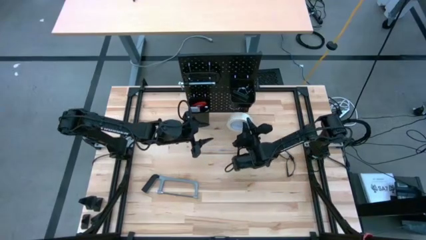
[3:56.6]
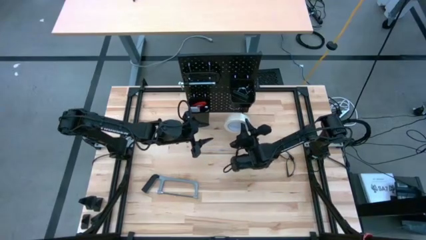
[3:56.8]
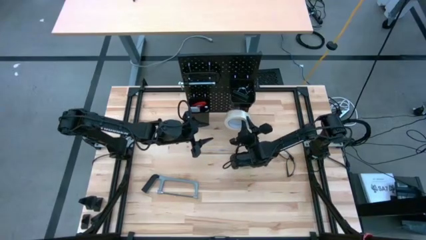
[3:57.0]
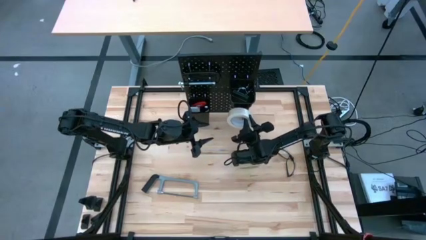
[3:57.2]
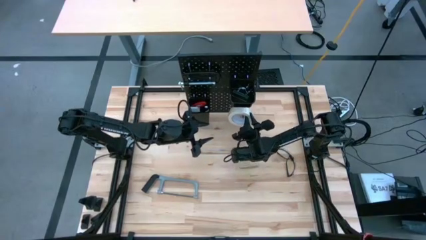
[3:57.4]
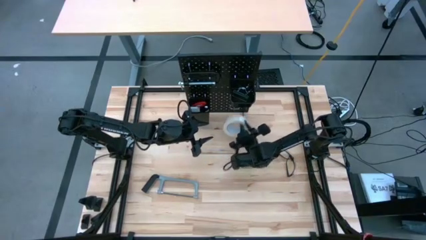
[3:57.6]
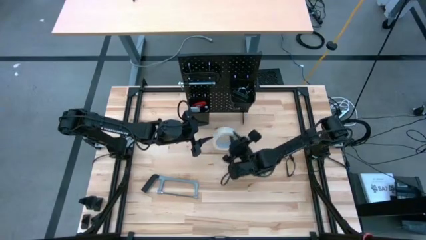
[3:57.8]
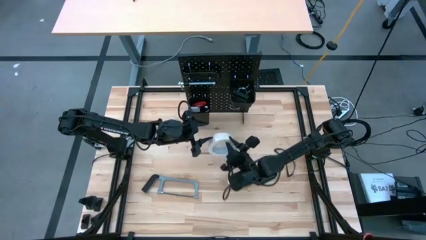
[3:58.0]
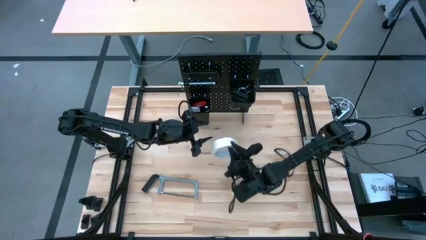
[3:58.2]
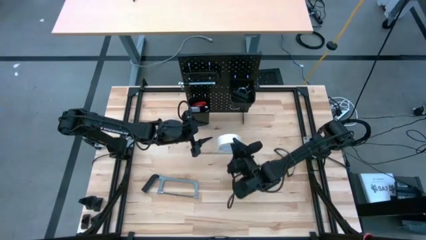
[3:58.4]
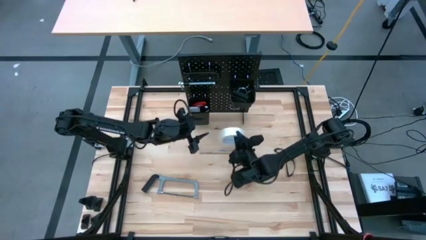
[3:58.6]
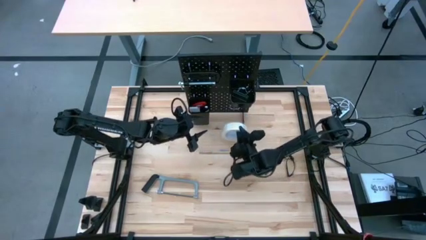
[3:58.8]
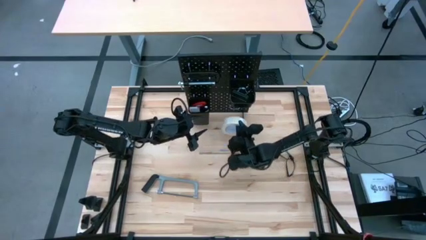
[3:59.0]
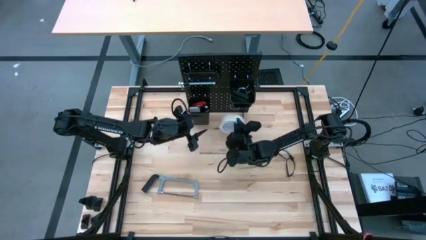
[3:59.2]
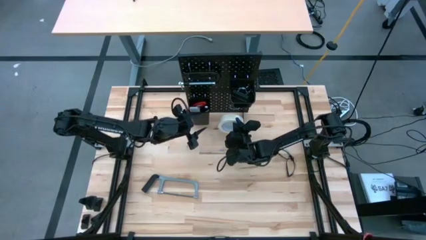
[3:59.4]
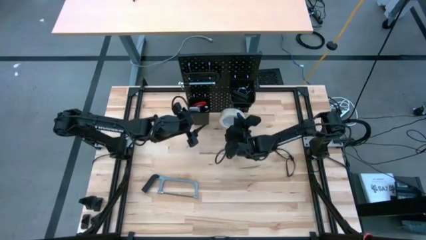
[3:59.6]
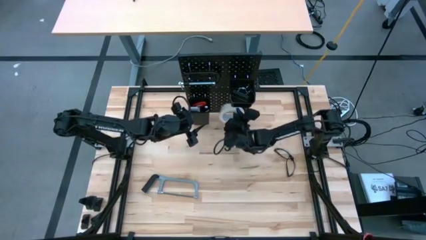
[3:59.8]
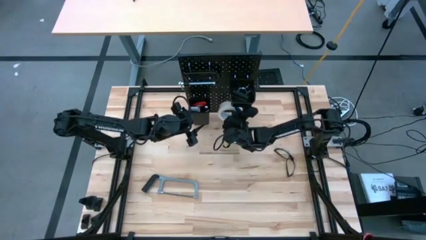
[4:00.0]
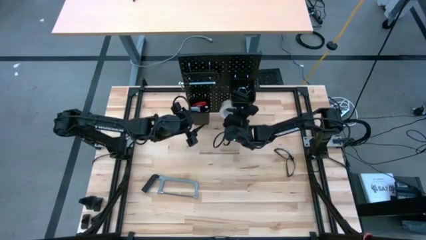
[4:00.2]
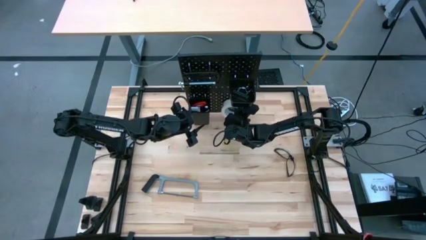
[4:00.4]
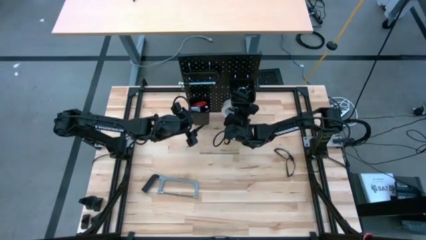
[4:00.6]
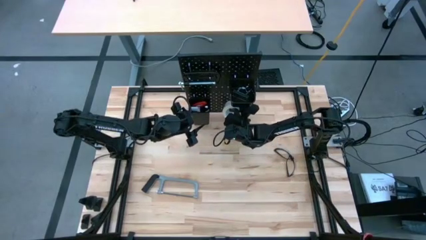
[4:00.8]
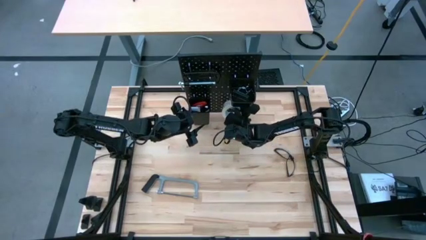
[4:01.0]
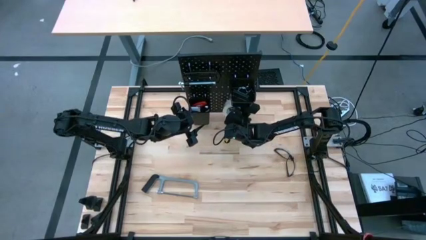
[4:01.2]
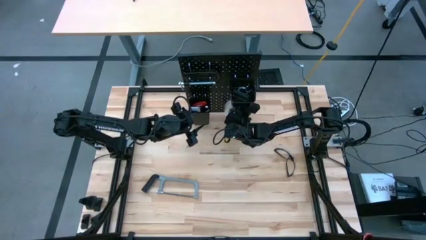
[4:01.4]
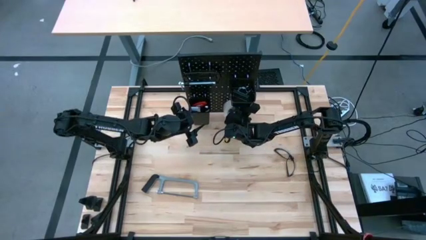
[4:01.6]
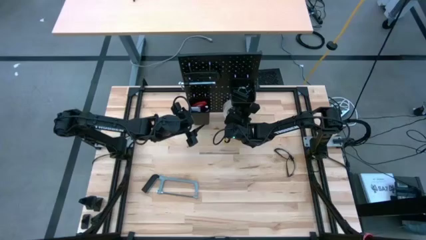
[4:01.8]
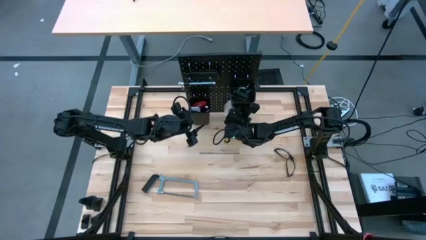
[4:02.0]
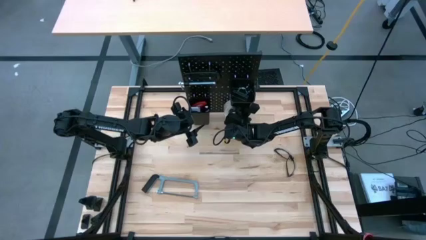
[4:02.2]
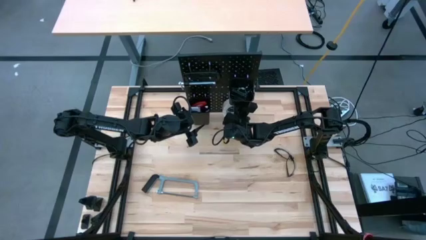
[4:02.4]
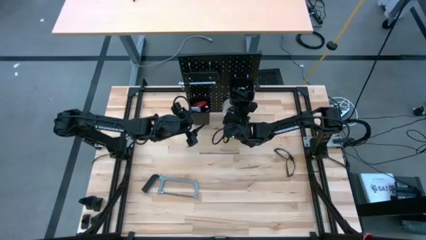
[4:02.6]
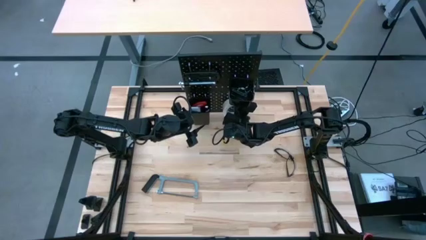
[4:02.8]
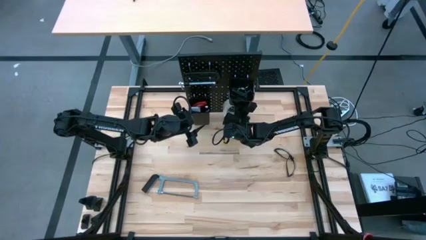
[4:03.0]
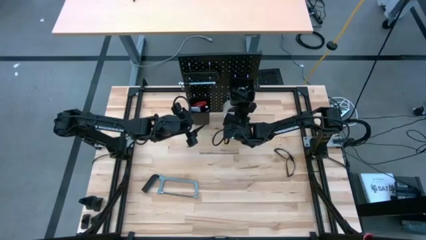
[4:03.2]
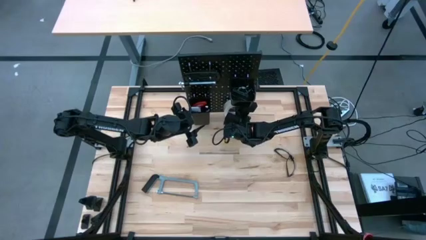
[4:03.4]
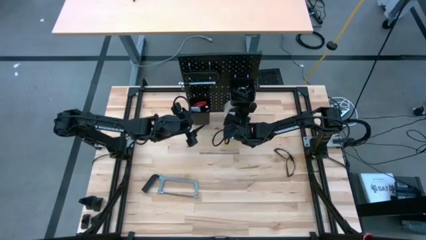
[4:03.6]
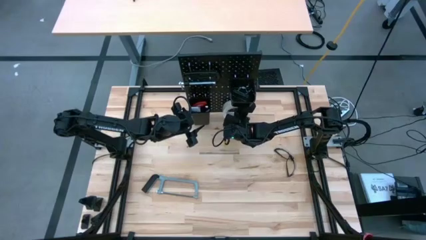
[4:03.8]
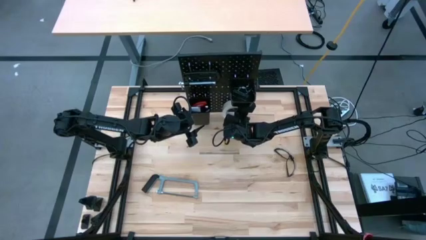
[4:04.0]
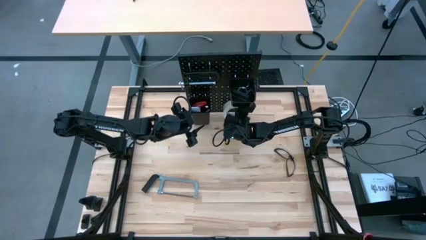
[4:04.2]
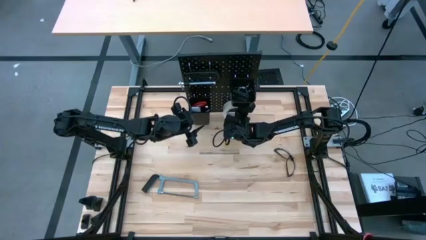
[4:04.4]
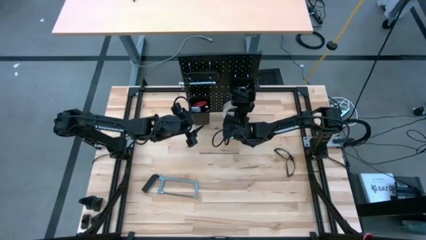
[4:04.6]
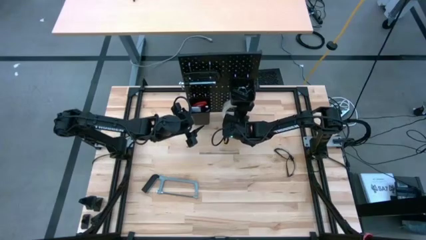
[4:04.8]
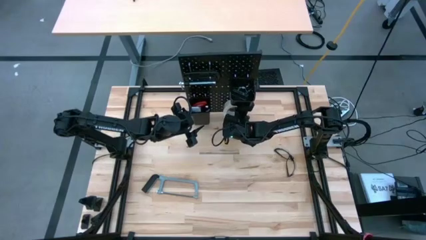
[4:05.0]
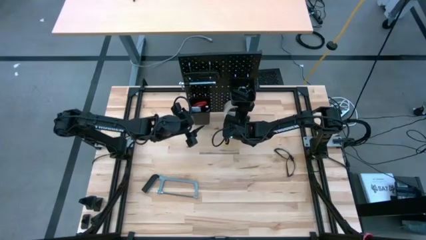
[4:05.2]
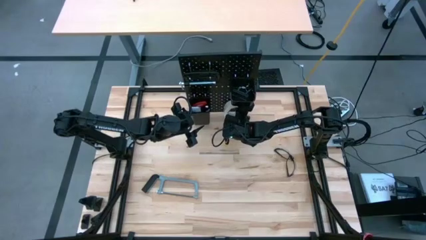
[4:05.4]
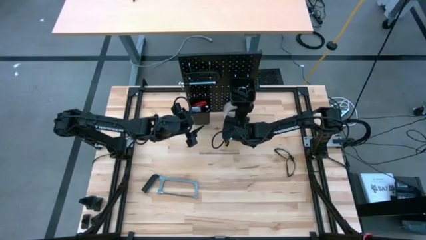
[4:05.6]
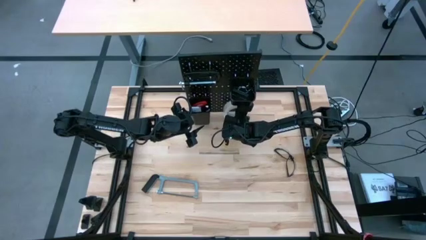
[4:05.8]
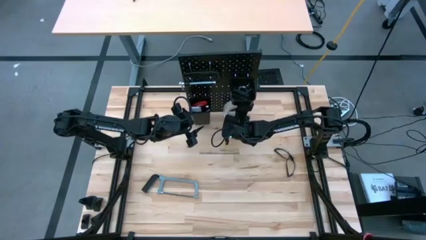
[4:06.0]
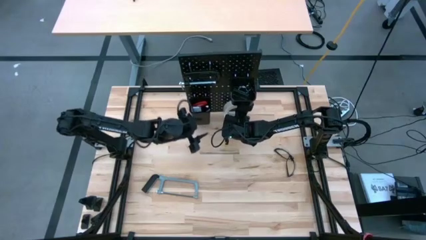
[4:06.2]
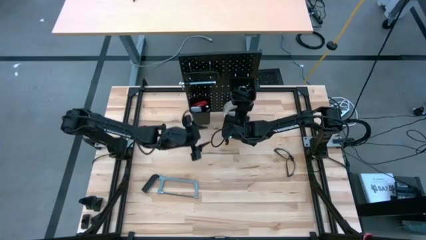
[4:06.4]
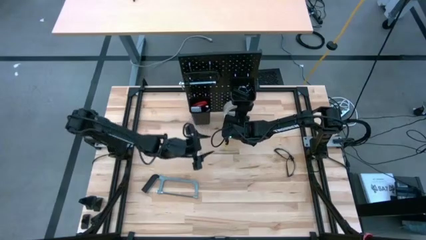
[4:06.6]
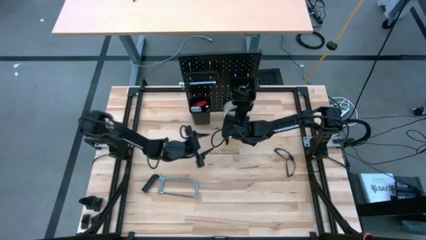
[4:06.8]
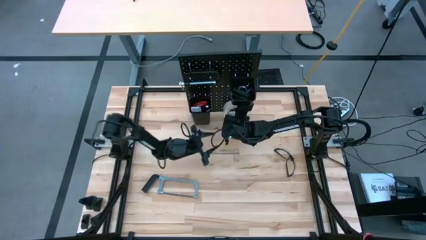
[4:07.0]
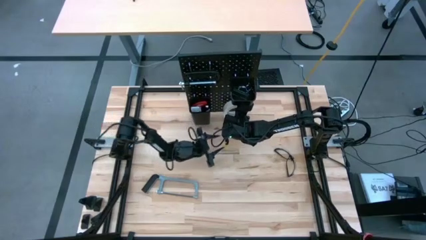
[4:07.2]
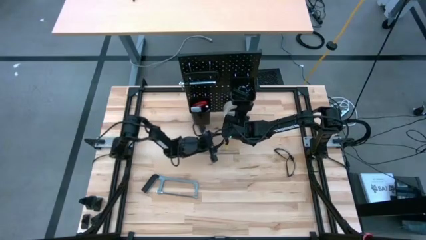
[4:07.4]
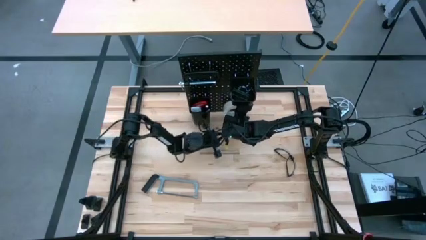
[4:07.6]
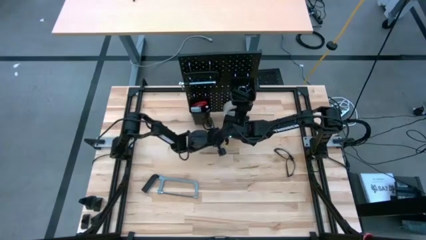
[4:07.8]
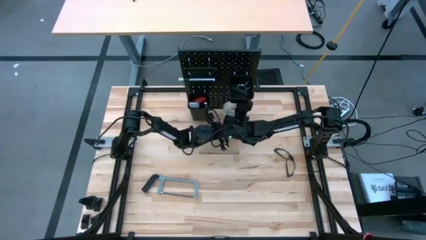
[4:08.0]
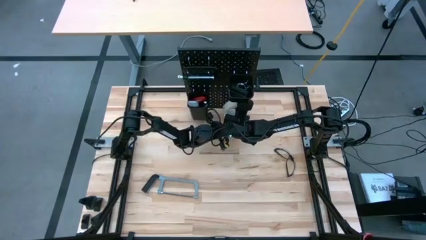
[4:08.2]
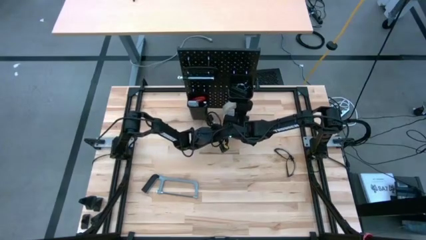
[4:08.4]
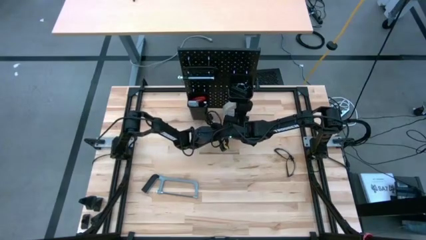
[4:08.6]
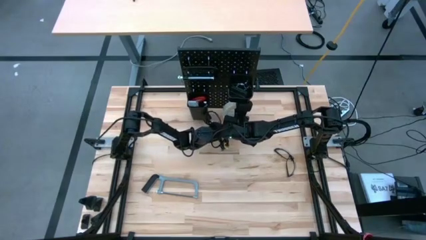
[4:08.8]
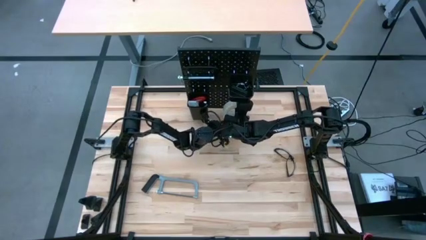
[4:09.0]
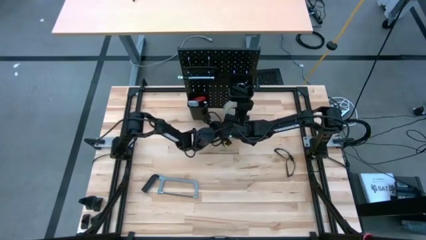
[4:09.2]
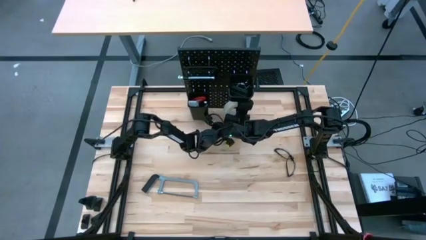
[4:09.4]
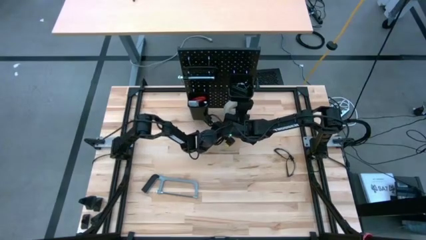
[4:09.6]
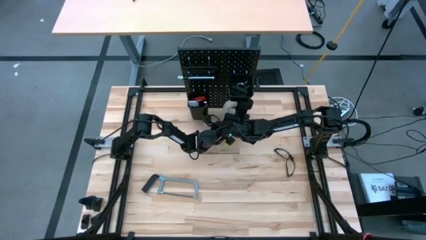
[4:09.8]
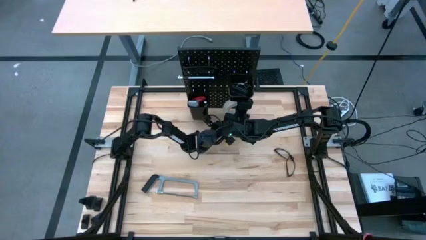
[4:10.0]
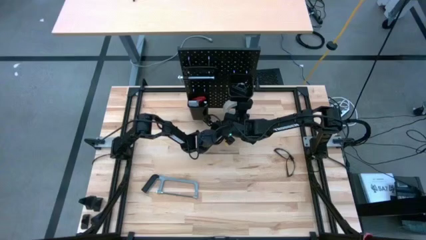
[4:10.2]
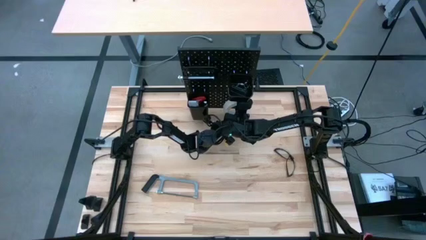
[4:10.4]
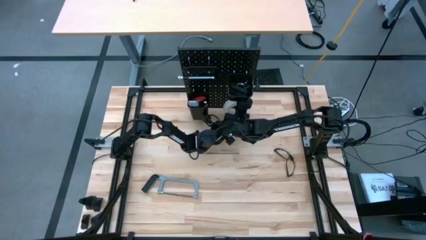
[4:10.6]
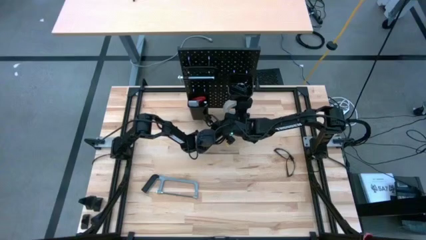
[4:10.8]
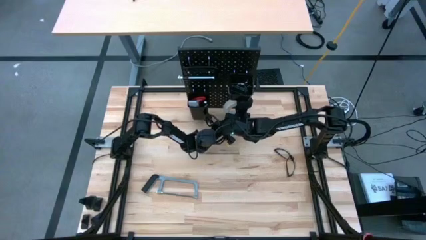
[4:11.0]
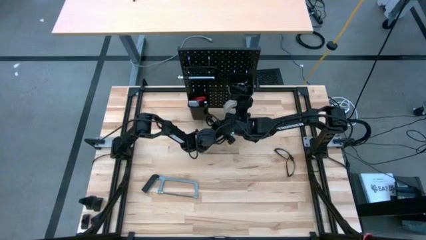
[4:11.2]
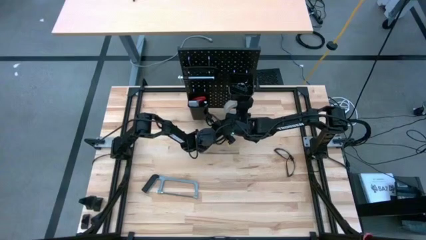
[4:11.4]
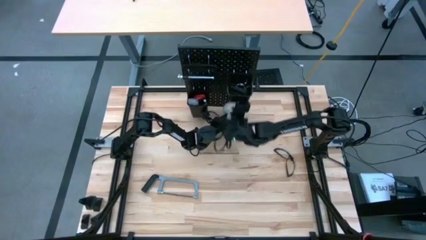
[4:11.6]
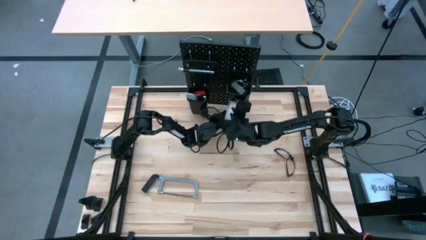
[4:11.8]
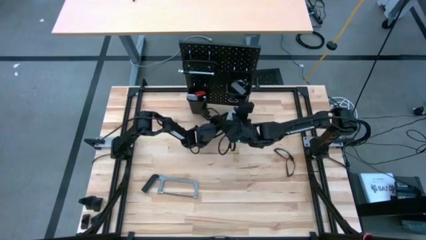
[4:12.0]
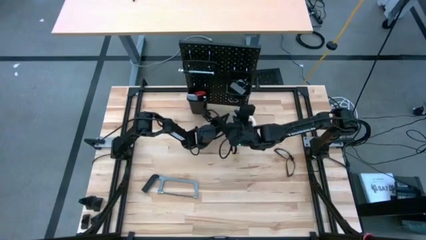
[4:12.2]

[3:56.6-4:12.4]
Task: Hang tools onto peg board
Hang the white tape on the black peg board

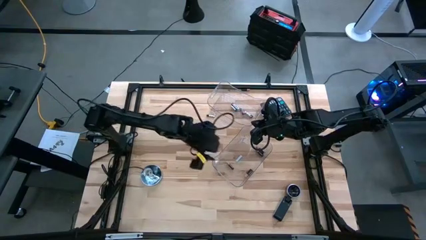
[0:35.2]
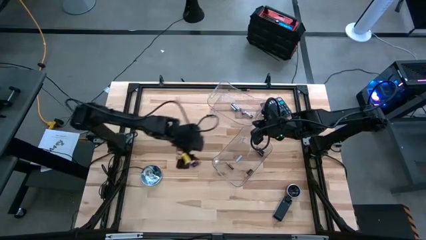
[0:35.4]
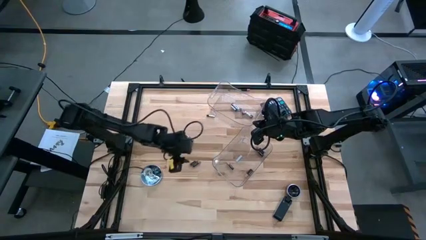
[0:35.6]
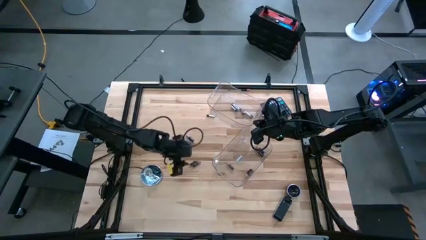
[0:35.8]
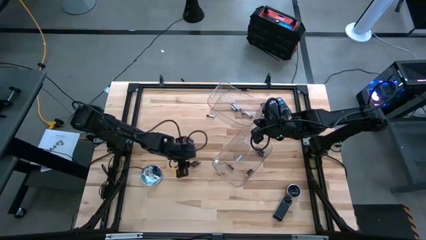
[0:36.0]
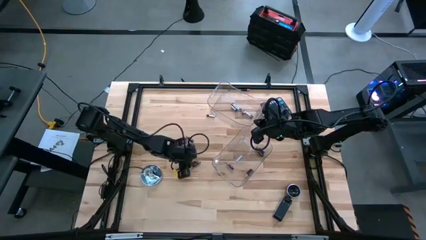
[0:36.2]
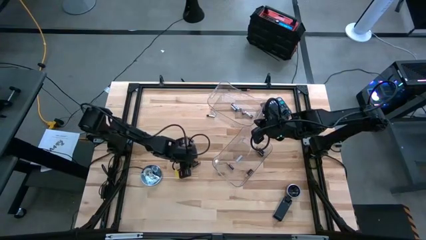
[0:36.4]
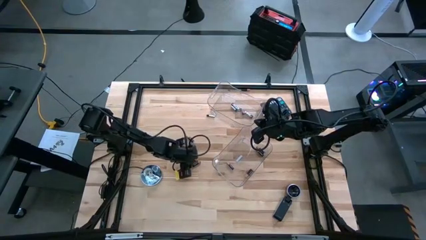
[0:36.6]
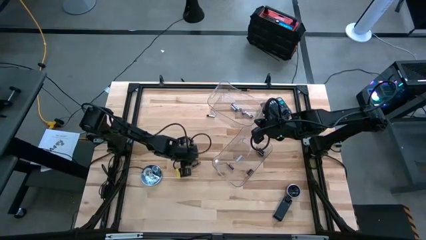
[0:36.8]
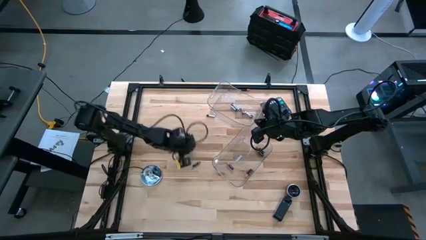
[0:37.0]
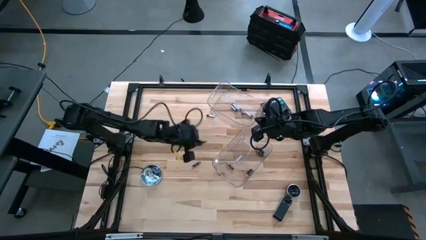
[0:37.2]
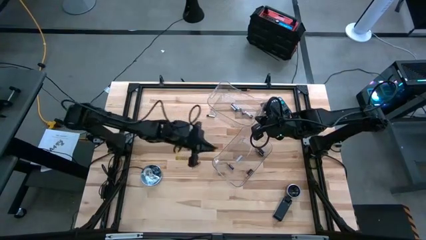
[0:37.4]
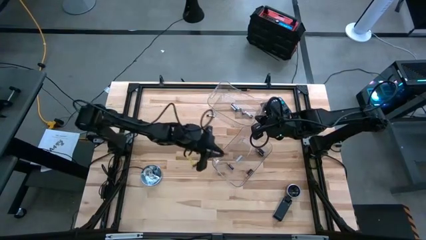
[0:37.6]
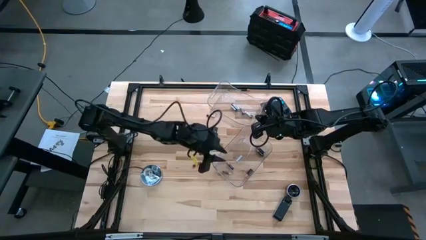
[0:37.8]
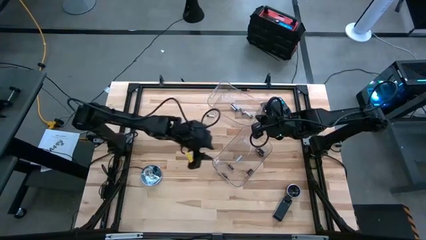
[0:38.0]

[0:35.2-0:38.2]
Task: Sort batteries
Put the black battery into the bottom transparent bin
